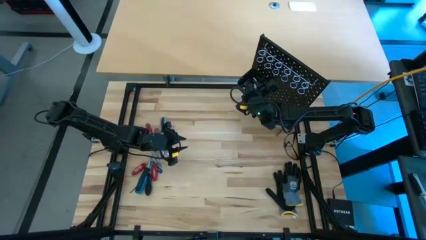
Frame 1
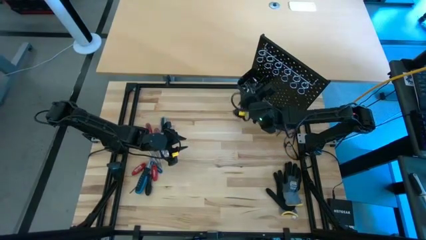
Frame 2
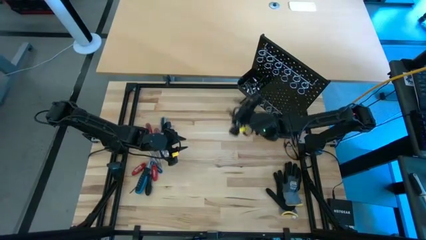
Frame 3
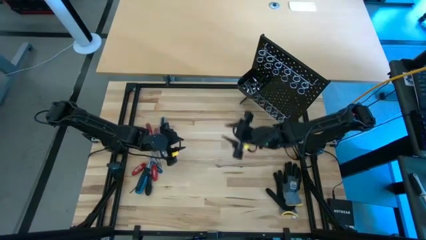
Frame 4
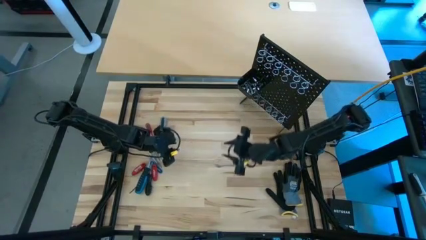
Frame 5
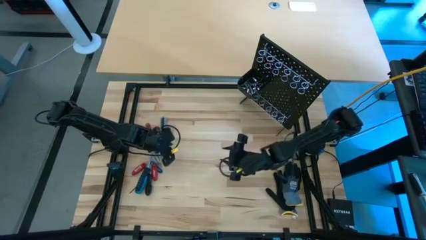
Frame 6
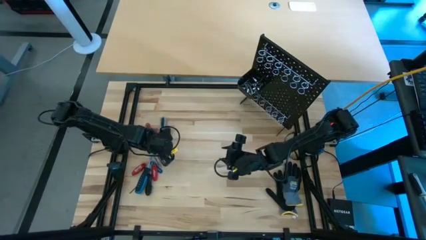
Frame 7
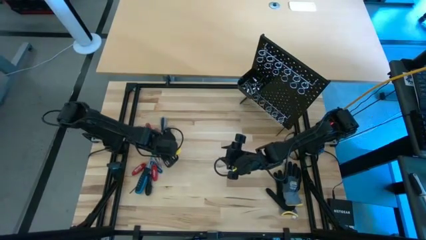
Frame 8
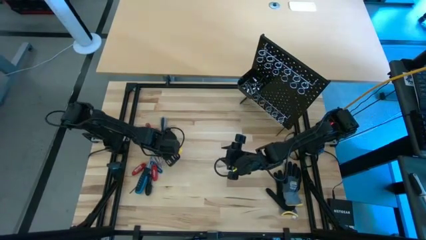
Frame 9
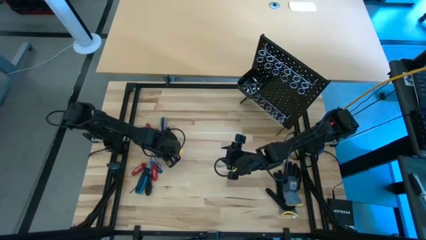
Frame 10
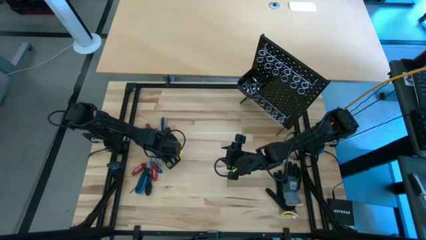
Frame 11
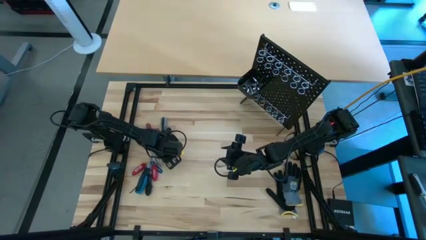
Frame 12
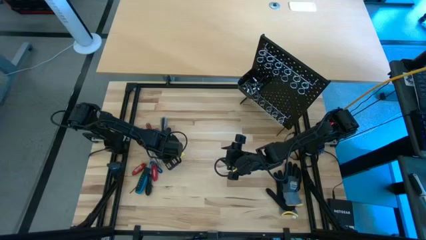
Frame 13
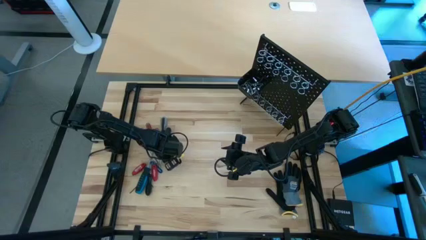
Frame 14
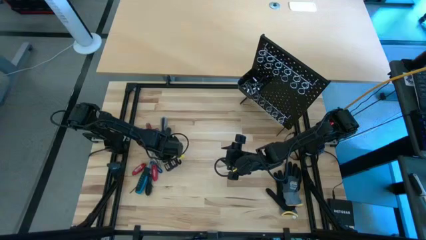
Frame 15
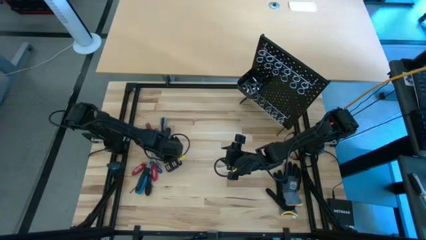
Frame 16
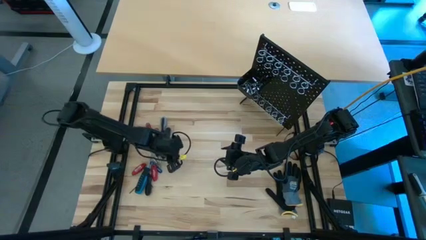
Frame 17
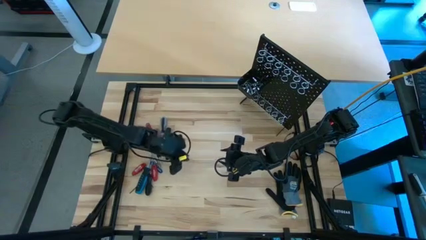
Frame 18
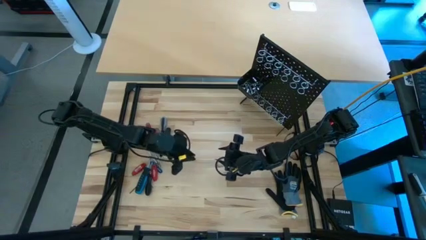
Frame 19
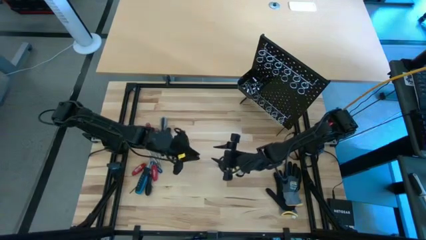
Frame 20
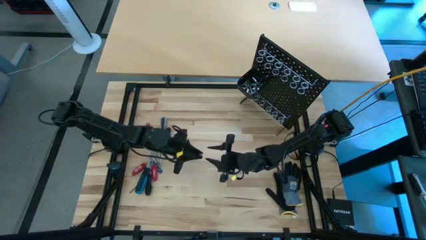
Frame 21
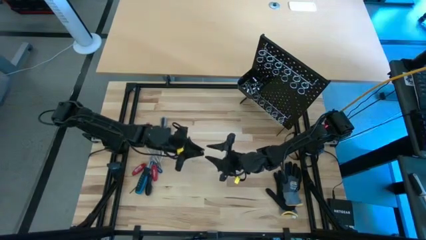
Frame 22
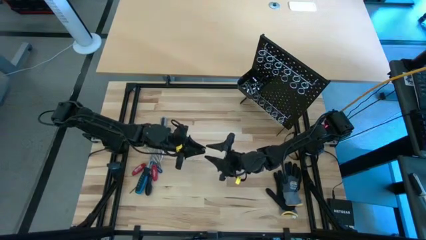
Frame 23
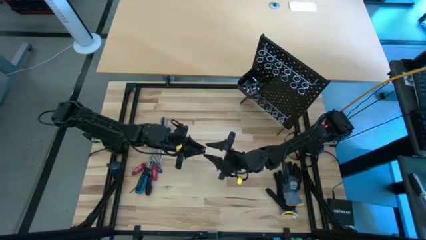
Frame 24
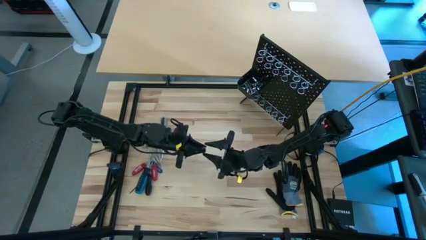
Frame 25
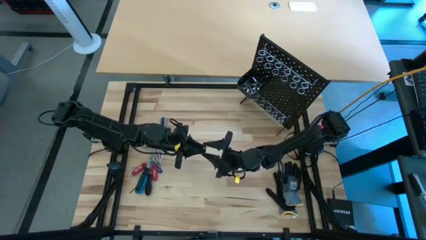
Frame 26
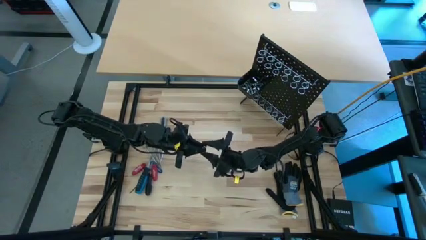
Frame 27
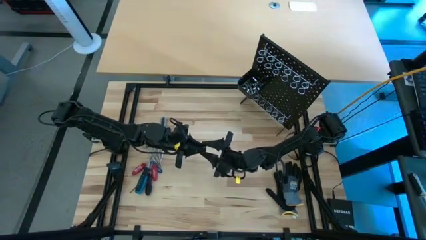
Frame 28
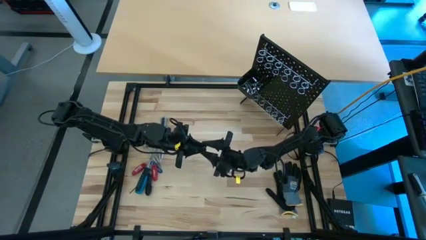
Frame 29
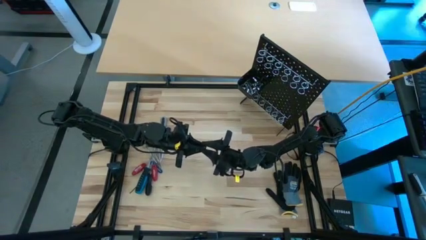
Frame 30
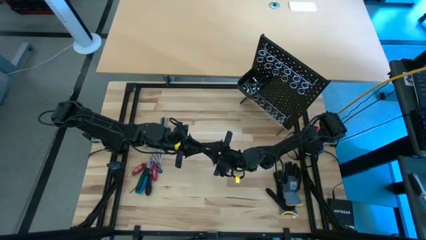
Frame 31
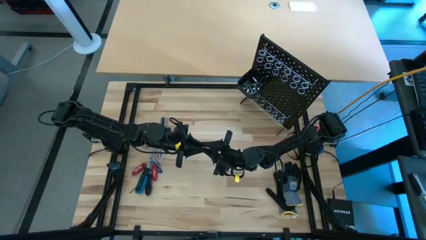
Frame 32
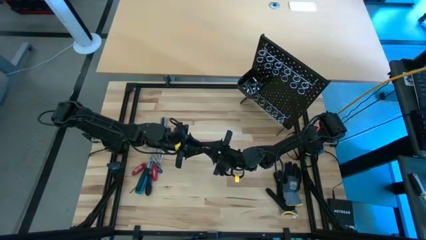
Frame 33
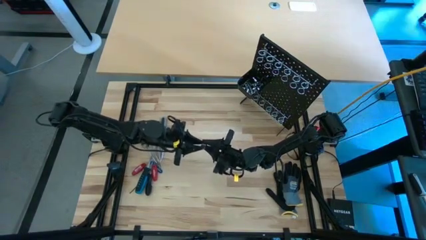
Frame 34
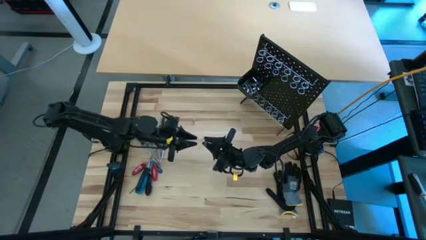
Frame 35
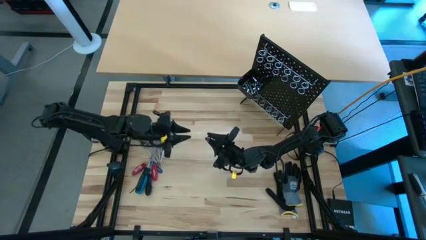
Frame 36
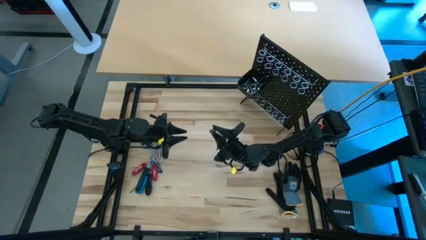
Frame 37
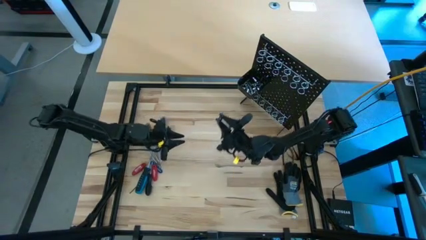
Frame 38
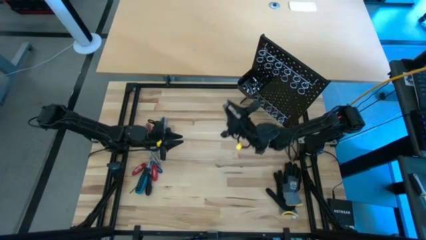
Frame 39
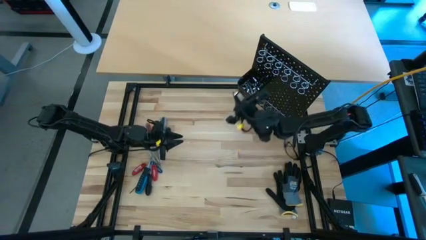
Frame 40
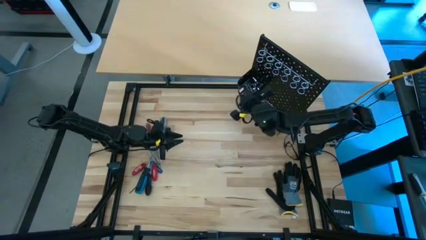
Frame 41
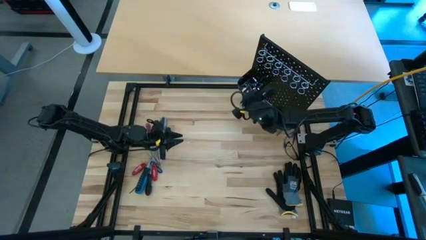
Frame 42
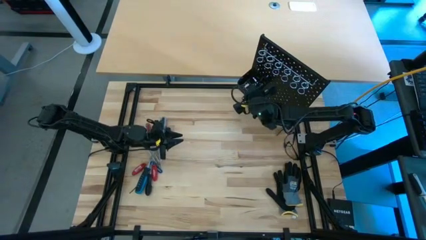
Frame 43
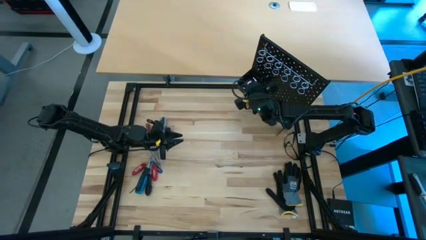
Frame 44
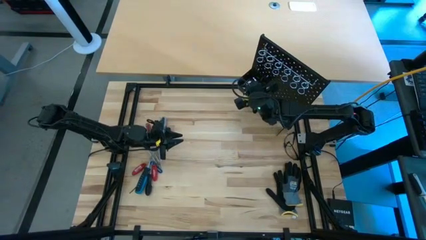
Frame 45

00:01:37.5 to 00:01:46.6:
Task: Hang tools onto peg board
Put the socket into the black pegboard bin
